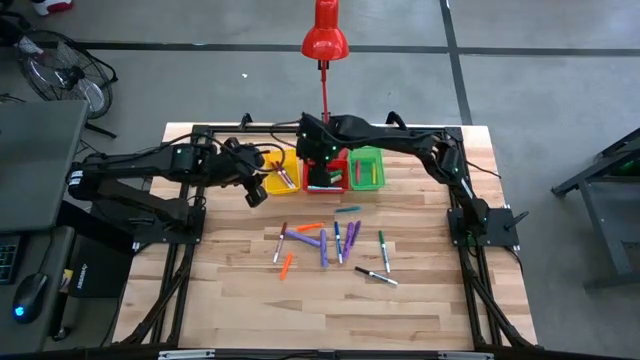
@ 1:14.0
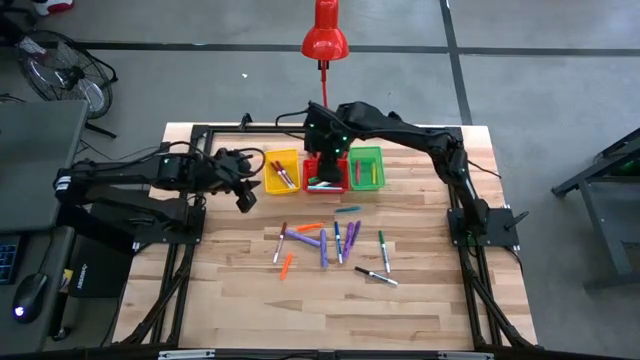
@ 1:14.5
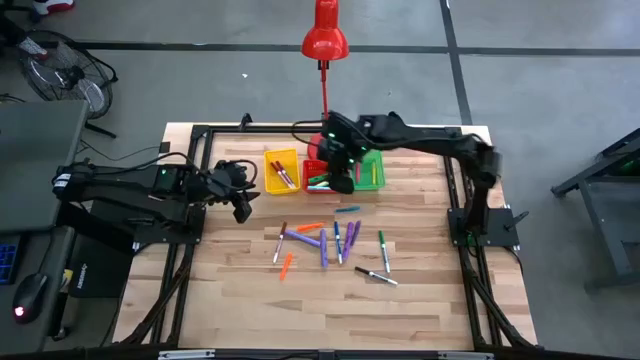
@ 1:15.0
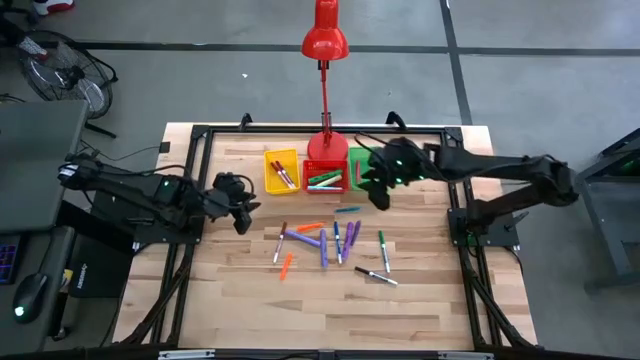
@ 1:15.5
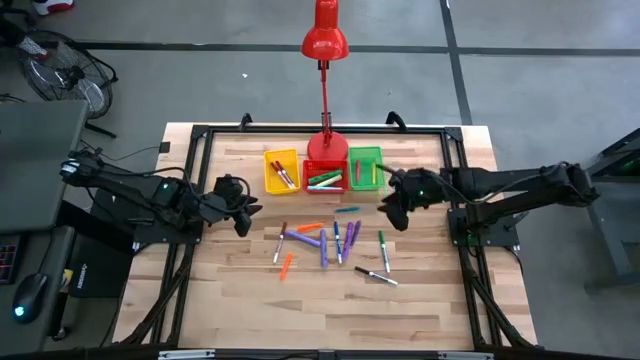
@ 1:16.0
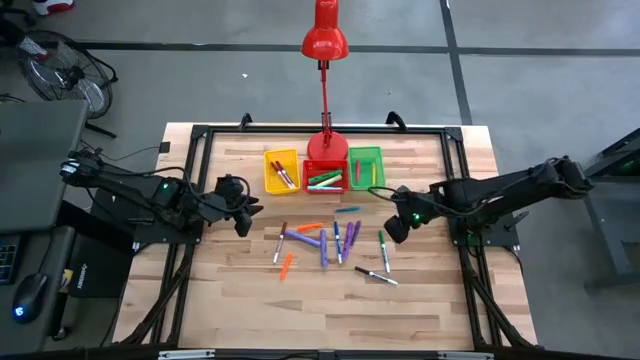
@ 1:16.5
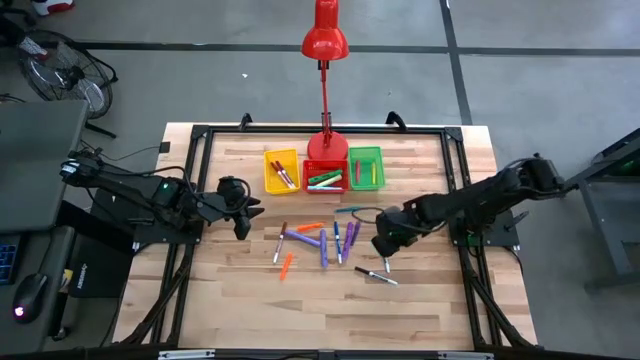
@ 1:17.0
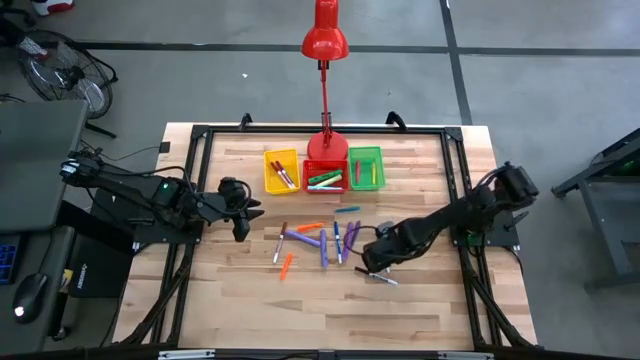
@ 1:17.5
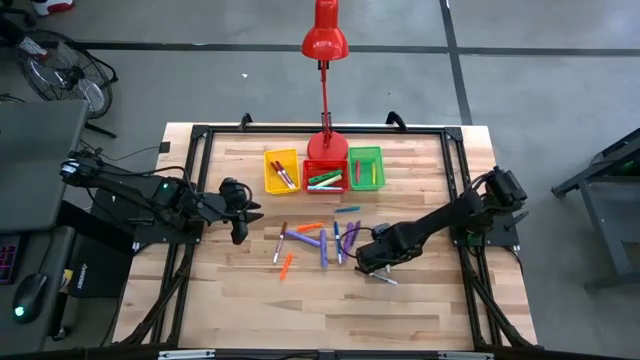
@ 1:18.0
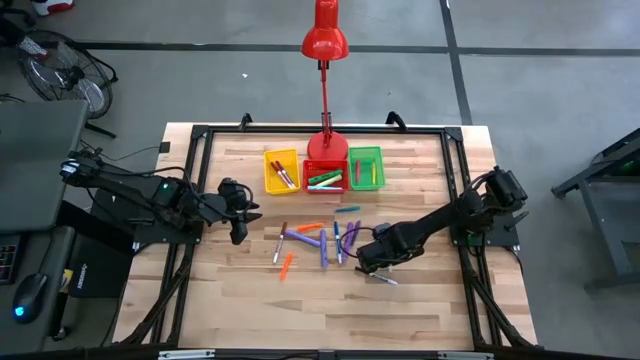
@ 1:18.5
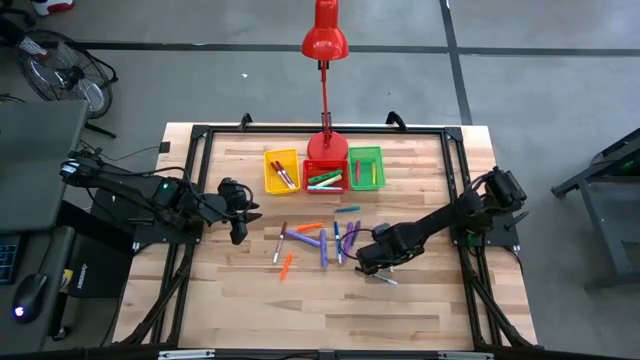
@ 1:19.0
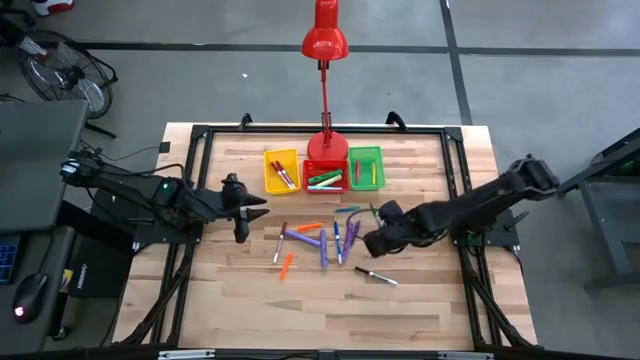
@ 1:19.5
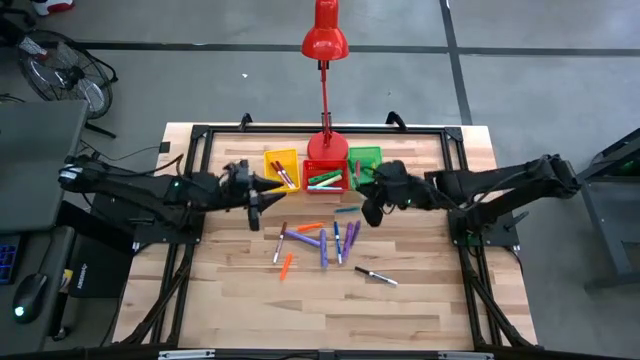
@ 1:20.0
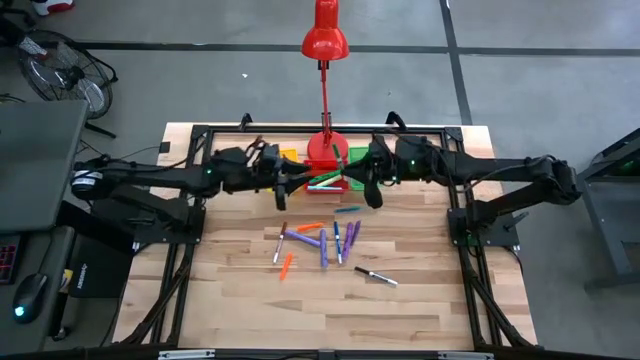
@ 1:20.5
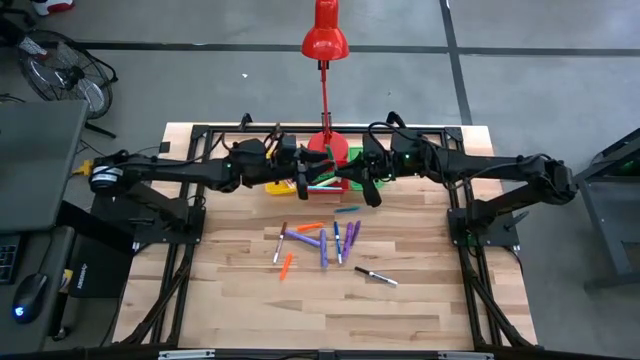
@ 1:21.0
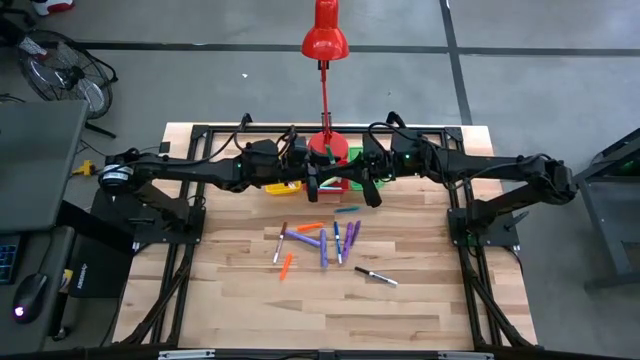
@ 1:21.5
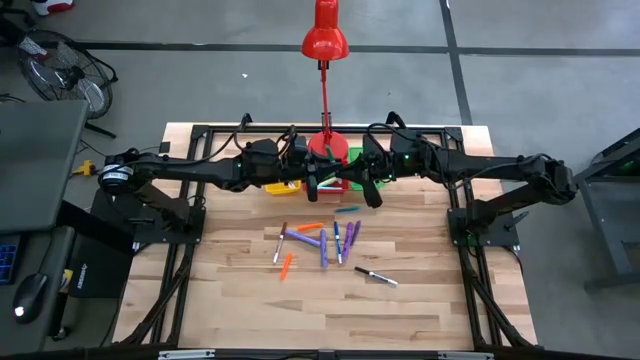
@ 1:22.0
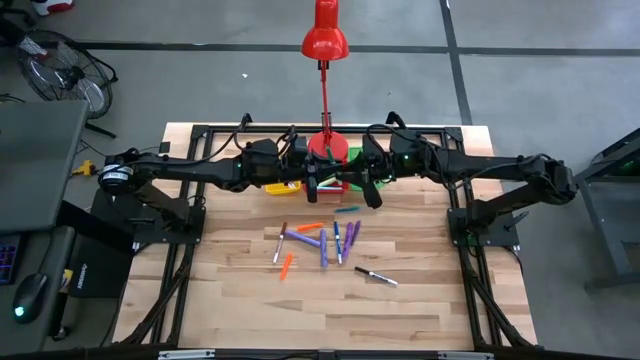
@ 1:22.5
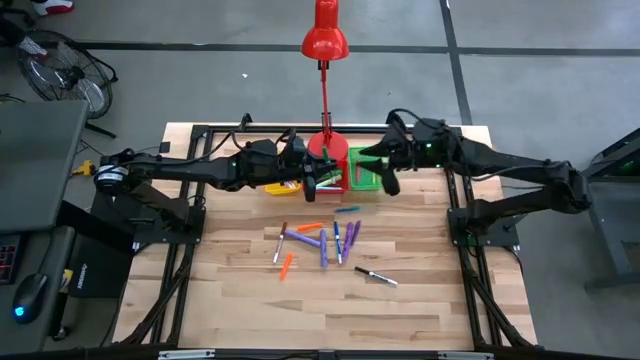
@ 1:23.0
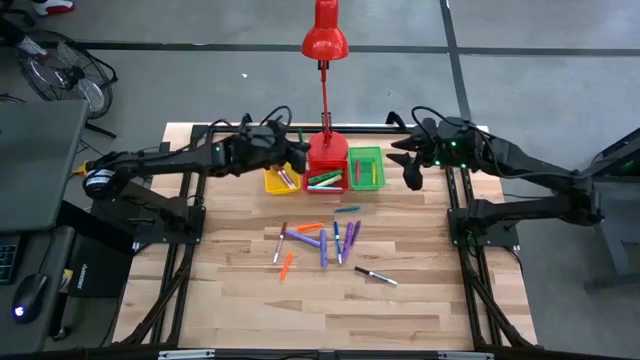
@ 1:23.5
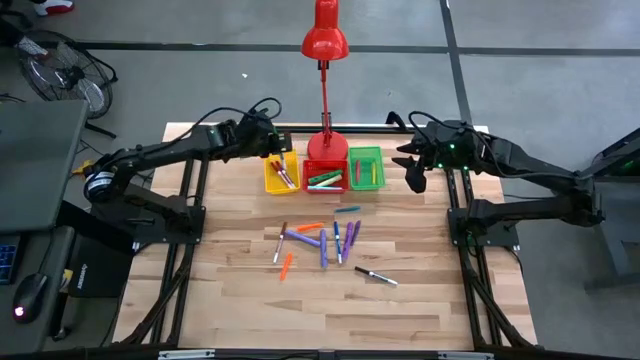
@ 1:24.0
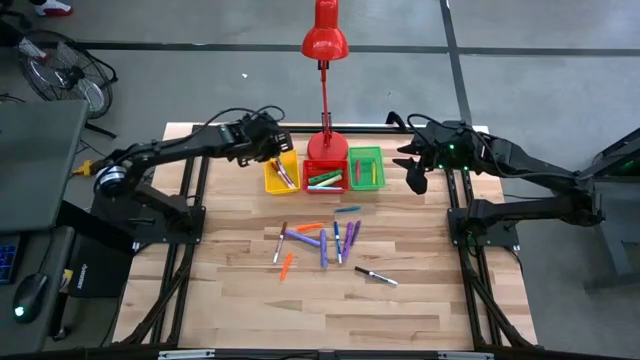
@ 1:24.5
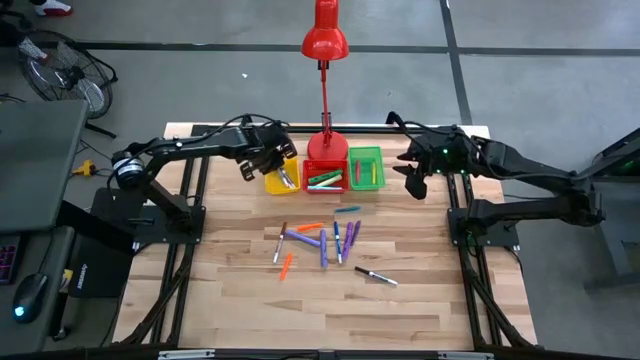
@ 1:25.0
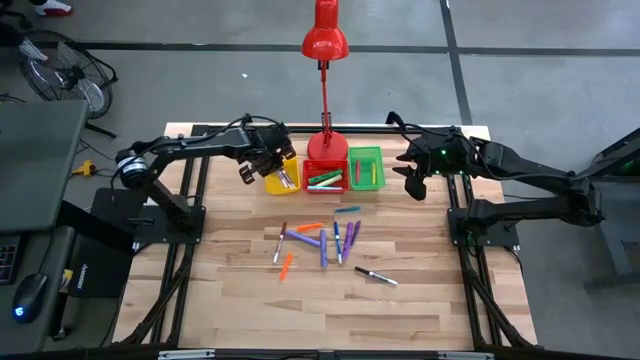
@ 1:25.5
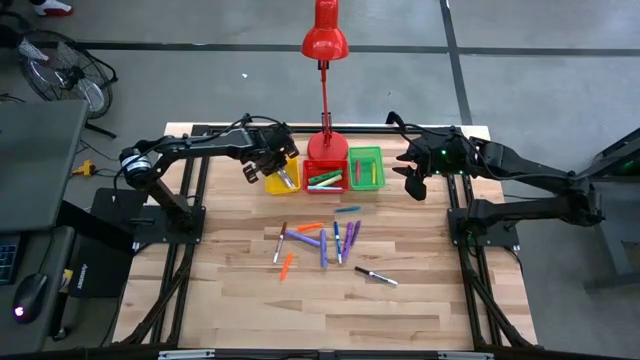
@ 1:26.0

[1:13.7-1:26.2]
Task: Pick & Place Markers
Put the green marker pen into the yellow bin

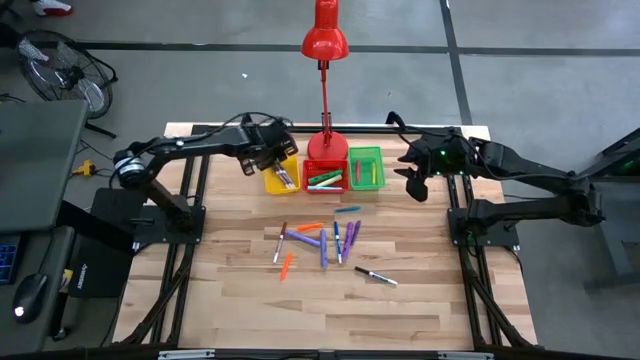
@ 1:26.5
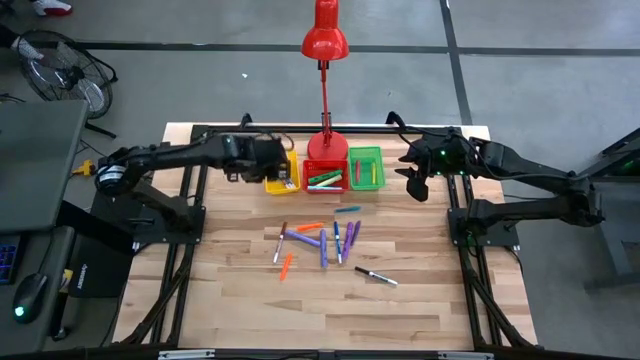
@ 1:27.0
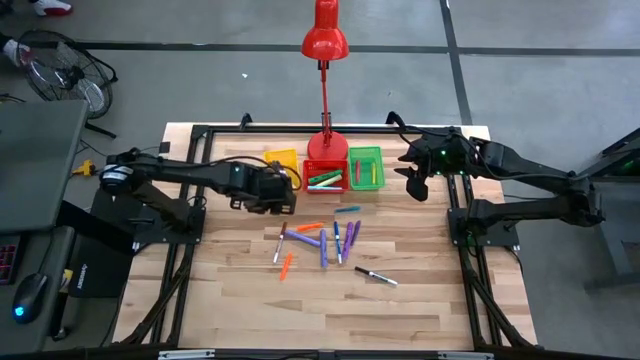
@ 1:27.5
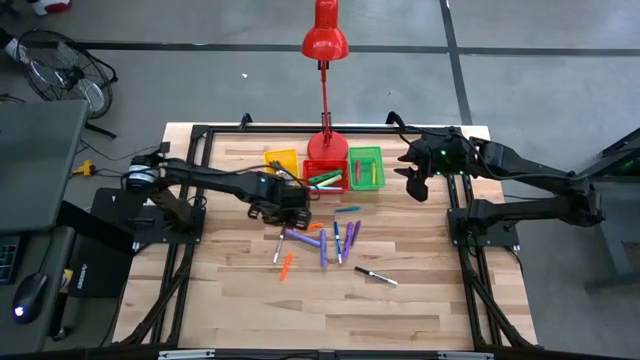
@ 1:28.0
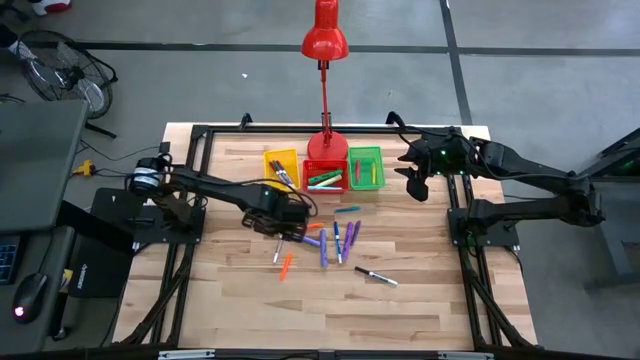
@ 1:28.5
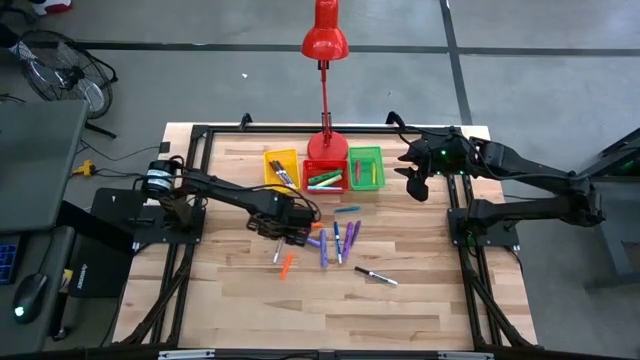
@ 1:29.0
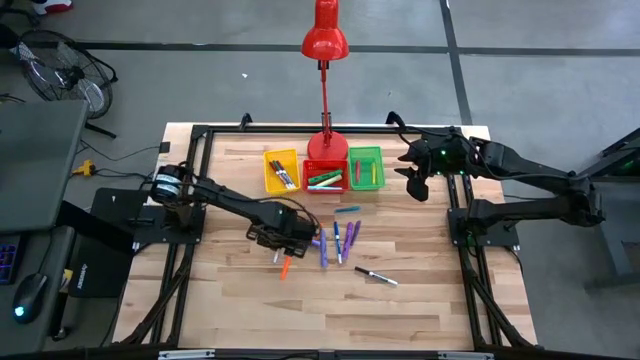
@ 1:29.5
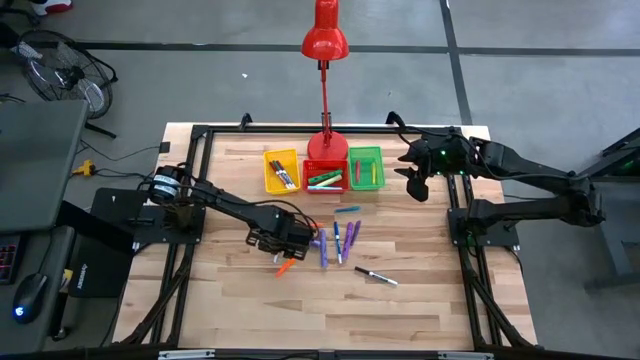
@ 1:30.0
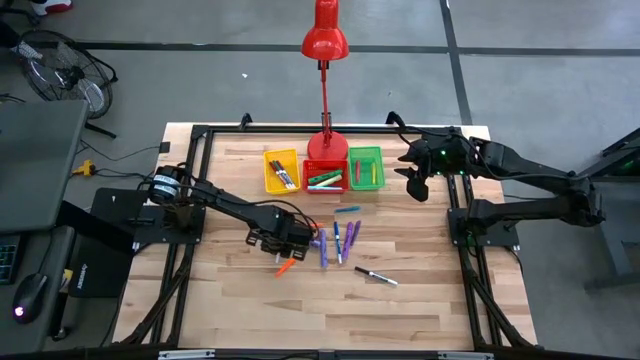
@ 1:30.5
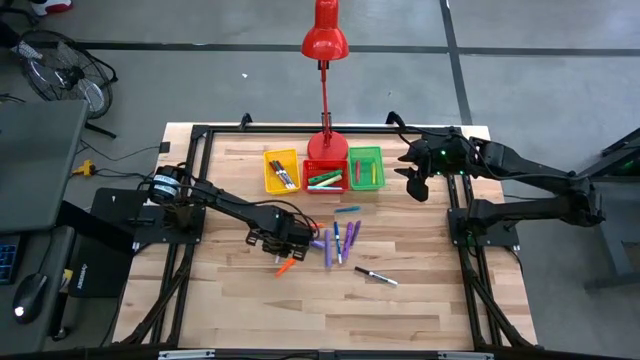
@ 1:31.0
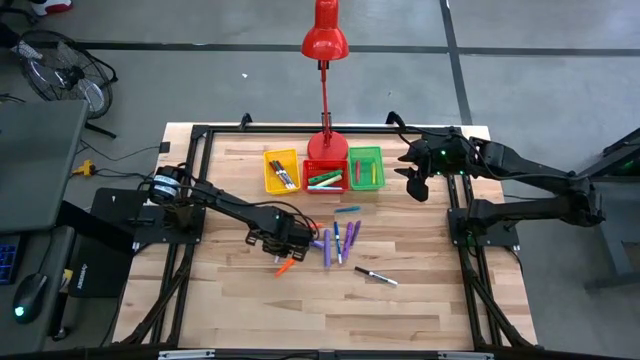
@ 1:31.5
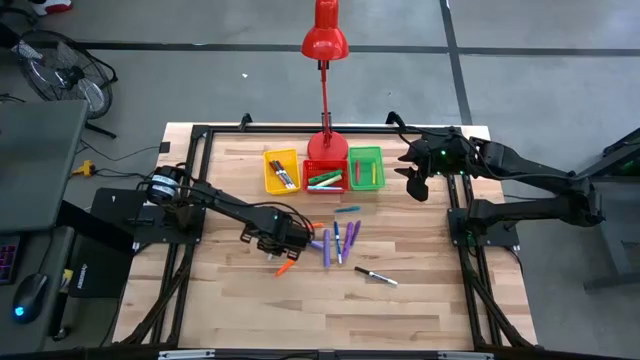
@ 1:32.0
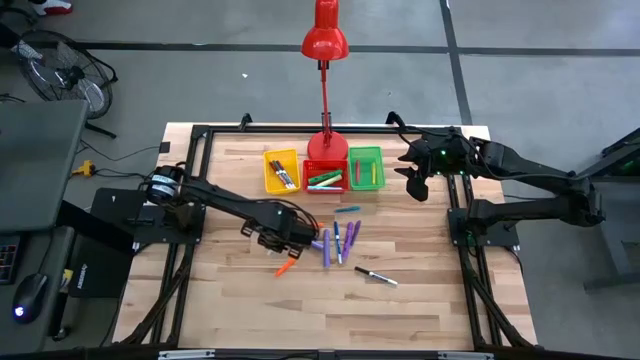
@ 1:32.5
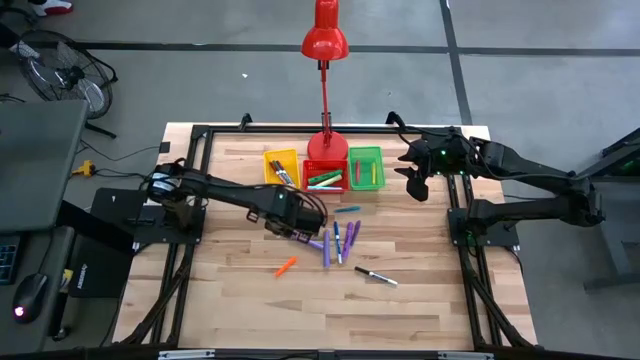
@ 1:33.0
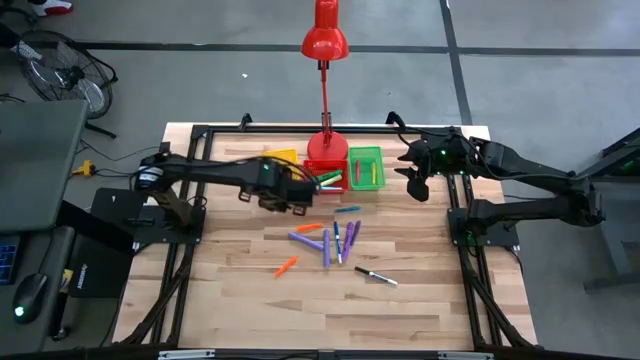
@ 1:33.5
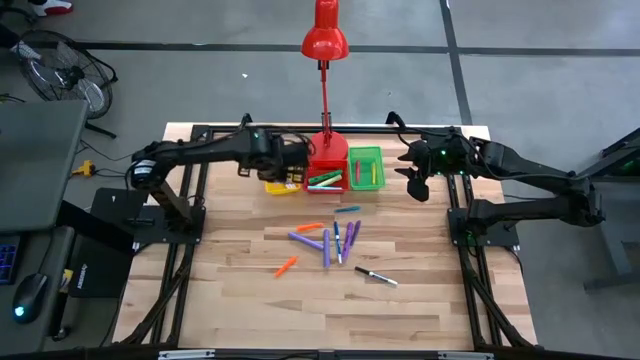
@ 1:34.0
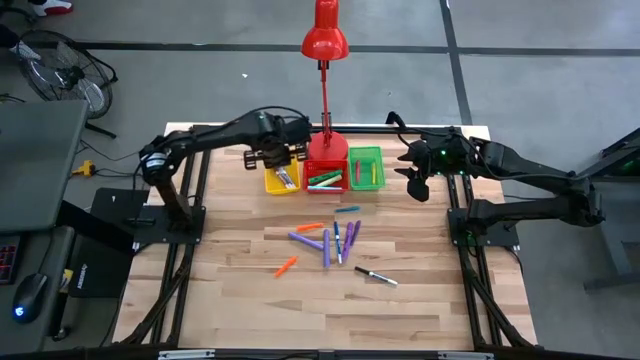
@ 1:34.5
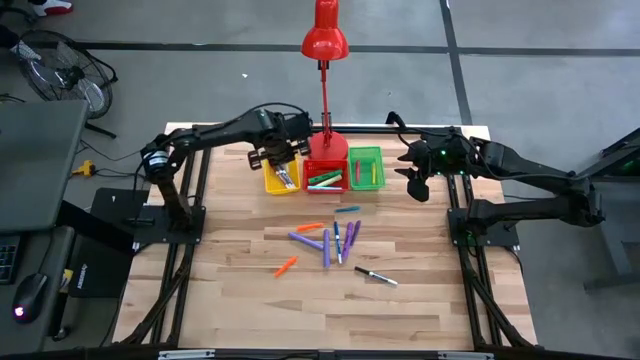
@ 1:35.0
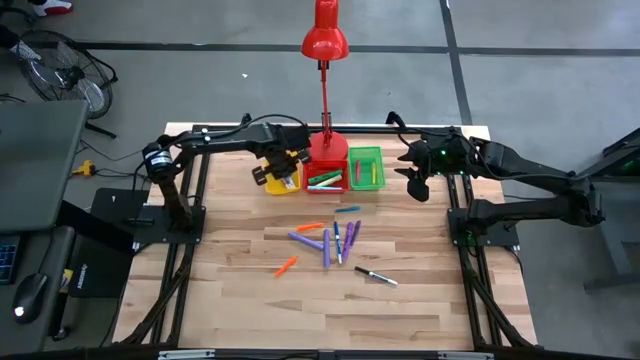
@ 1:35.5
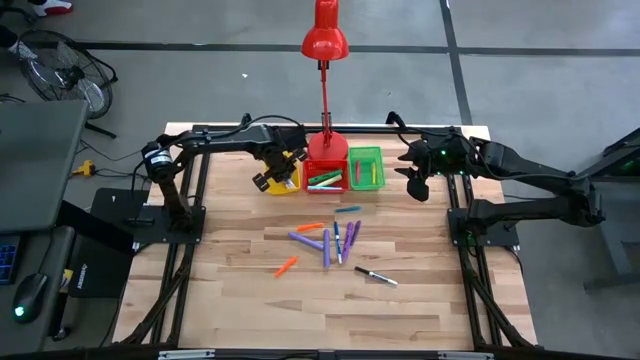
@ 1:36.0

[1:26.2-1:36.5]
Put the brown marker pen into the yellow bin
